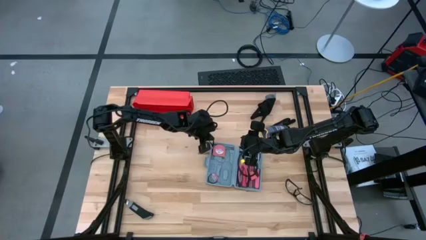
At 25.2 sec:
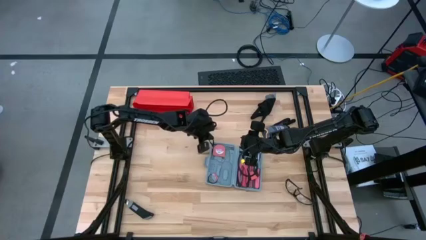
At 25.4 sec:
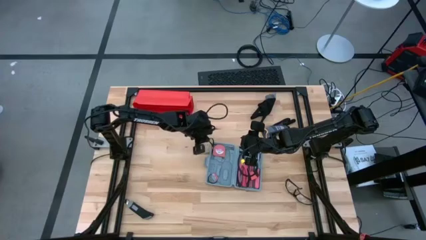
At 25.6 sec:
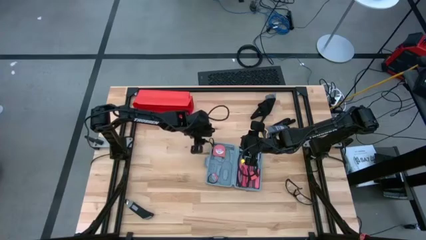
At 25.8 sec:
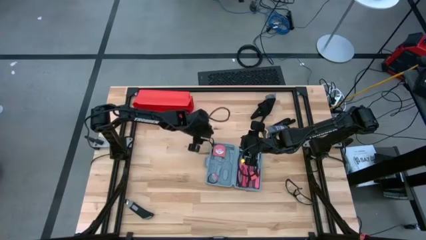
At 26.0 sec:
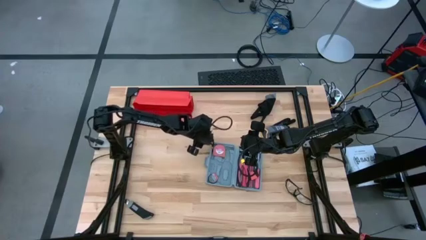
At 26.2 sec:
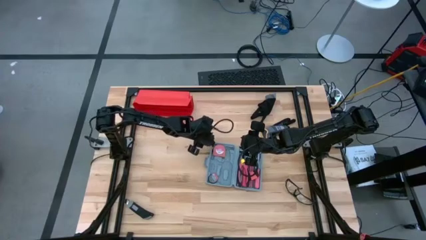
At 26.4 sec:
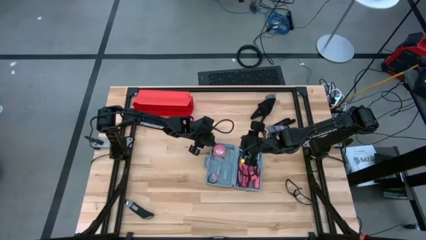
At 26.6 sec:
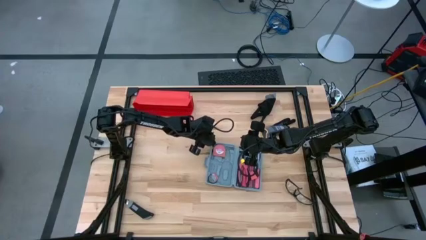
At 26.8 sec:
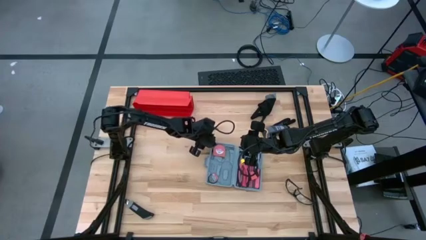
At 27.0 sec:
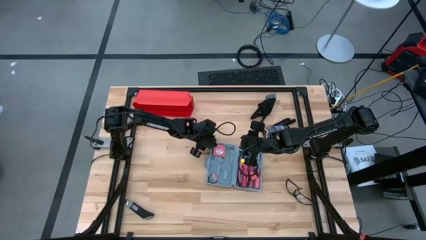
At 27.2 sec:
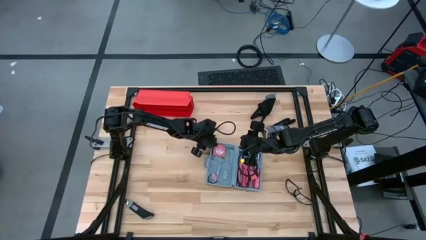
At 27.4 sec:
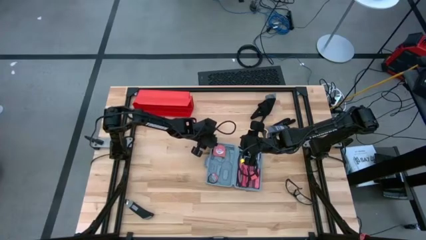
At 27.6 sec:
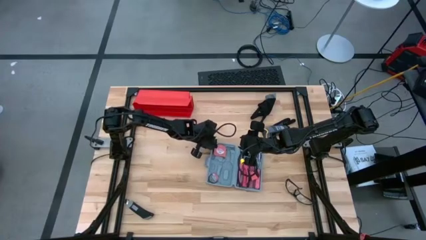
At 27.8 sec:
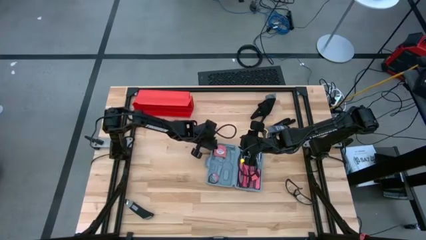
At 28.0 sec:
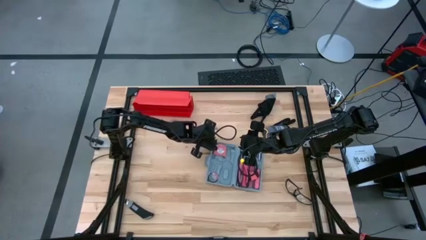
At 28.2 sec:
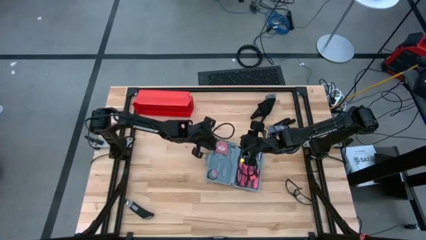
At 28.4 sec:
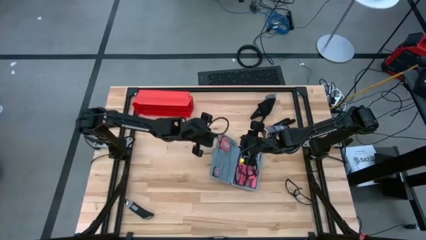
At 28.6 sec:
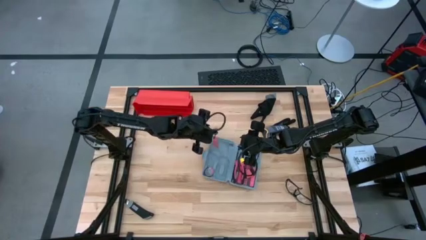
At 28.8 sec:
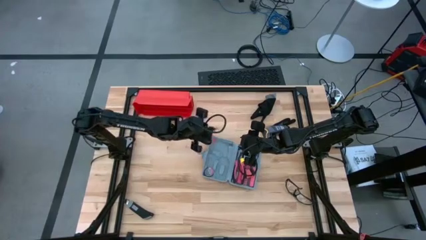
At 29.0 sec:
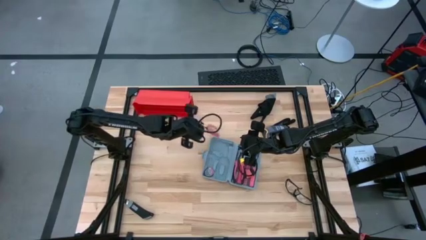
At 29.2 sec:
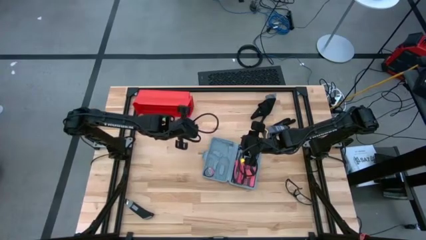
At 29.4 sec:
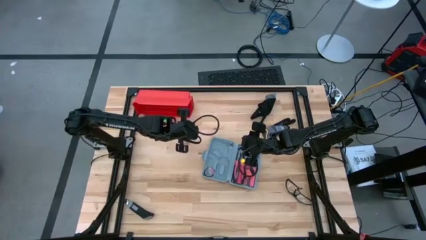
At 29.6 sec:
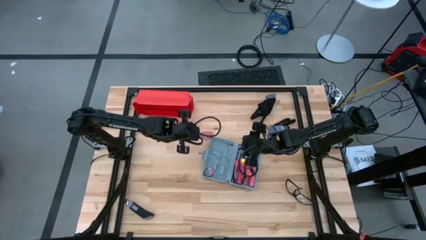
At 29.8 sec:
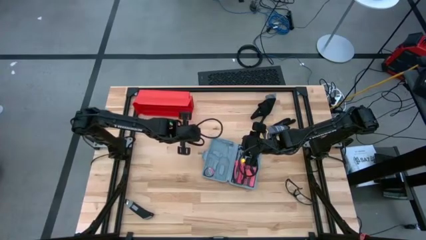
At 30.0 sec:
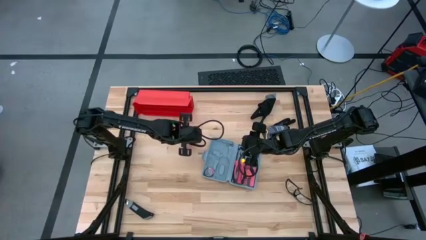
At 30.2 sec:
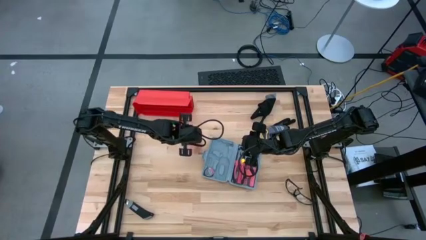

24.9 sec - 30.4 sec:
Task: prefit tool cases
Remove the orange measuring tape from the gray pre-fit tool case

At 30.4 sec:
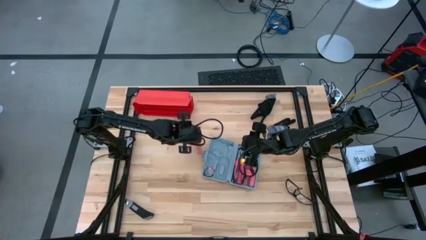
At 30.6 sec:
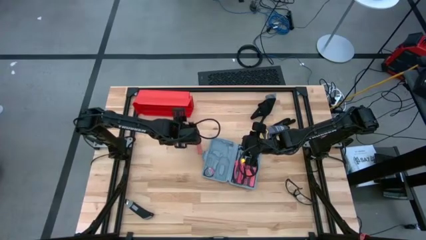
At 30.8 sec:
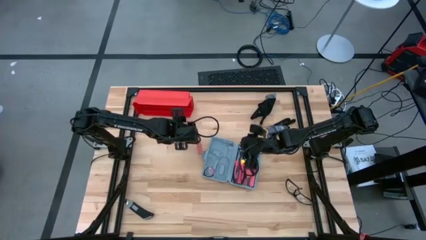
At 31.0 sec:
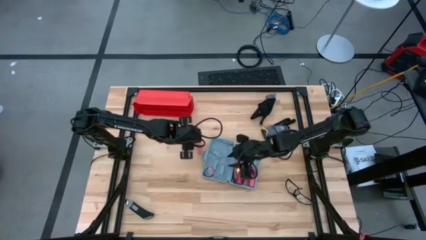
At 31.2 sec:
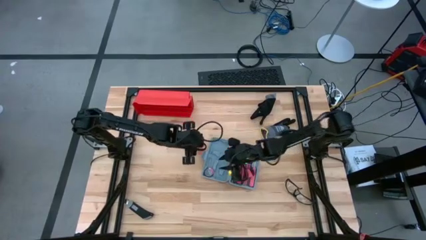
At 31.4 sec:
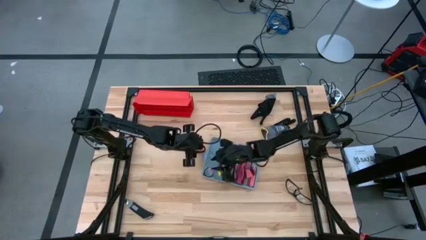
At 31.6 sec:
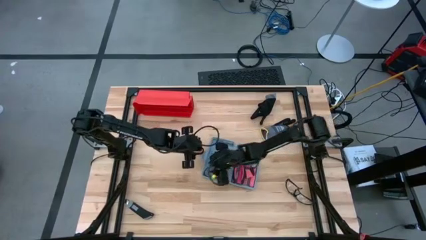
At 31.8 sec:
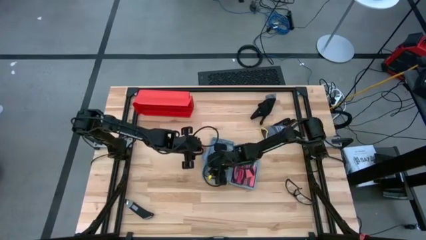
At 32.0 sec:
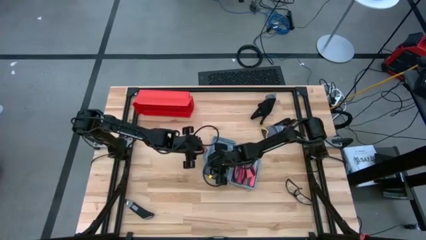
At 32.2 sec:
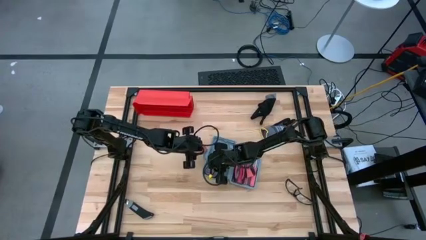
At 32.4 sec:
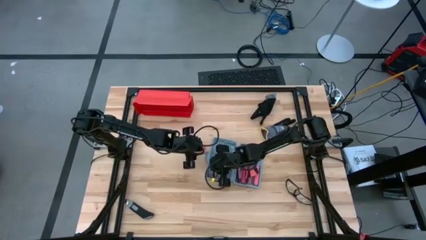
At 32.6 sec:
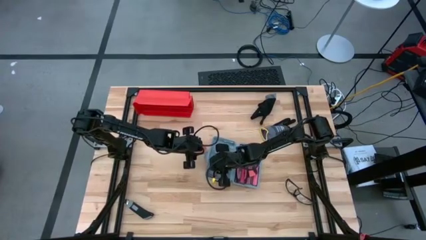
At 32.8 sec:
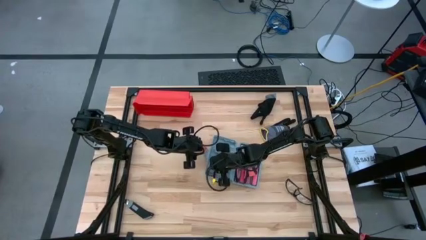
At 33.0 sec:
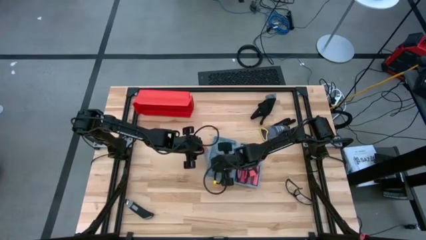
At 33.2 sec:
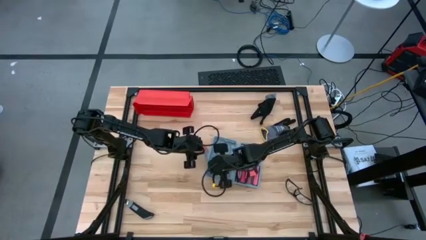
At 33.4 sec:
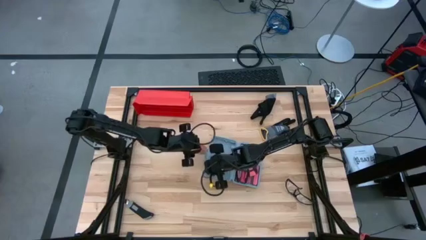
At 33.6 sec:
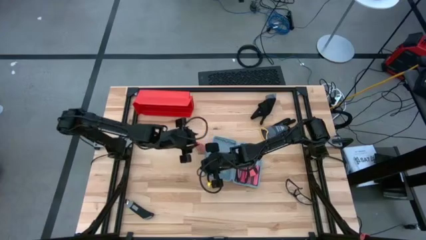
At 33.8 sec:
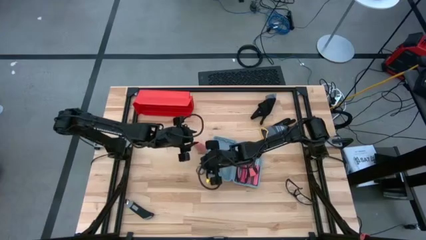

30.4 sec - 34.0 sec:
Remove the black electrical tape from the gray pre-fit tool case

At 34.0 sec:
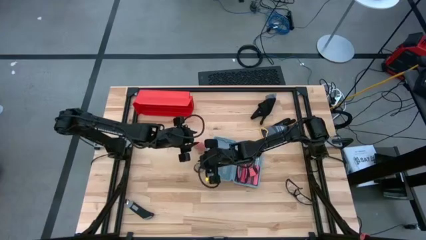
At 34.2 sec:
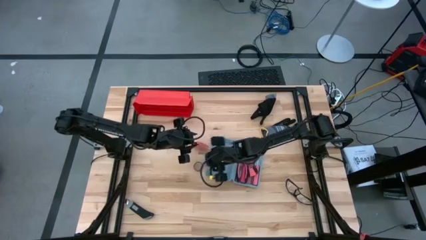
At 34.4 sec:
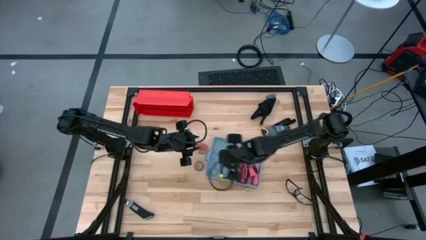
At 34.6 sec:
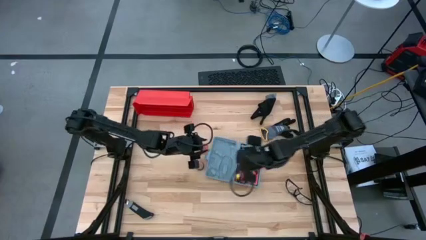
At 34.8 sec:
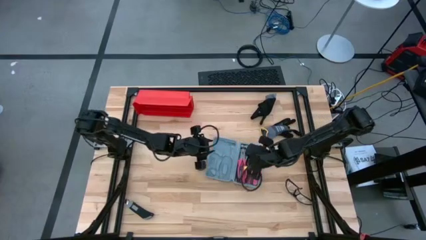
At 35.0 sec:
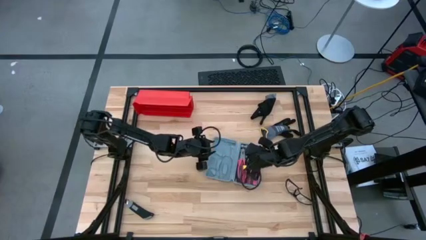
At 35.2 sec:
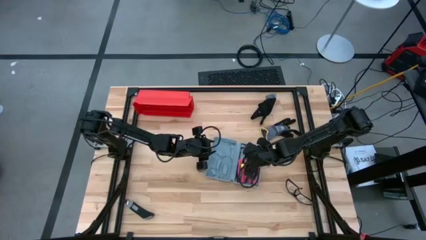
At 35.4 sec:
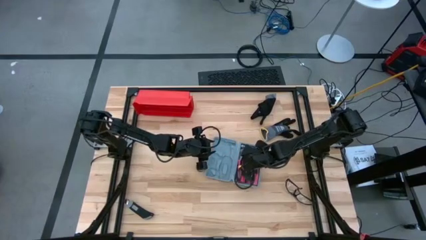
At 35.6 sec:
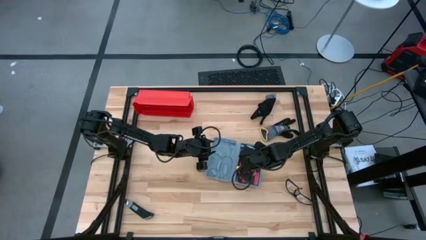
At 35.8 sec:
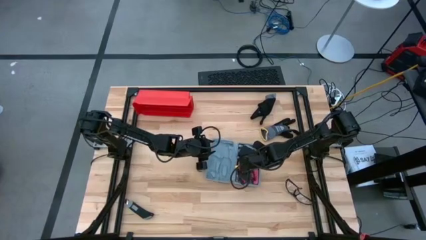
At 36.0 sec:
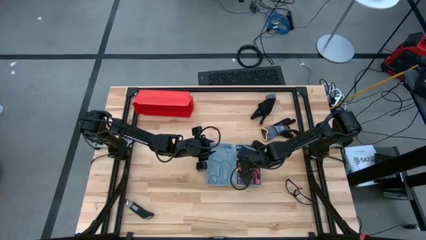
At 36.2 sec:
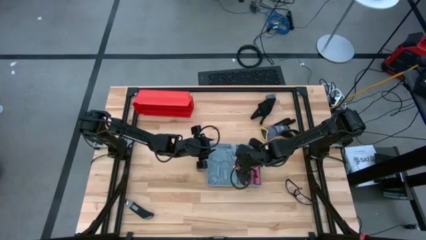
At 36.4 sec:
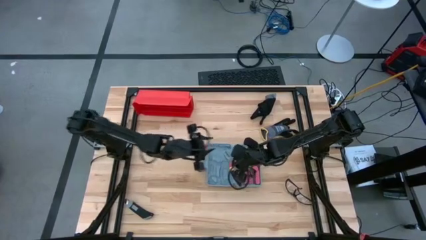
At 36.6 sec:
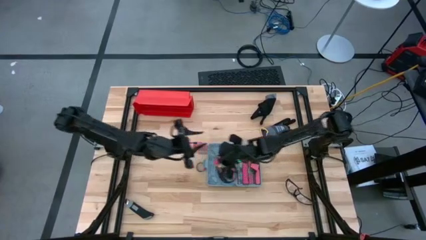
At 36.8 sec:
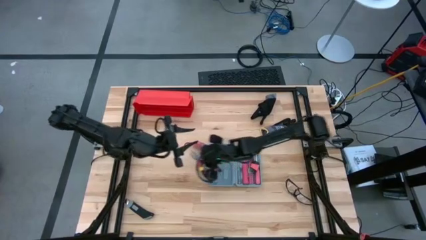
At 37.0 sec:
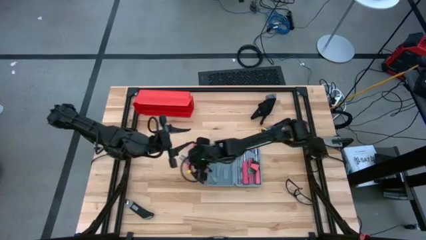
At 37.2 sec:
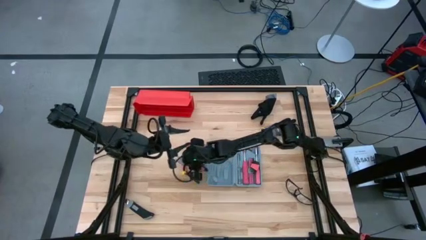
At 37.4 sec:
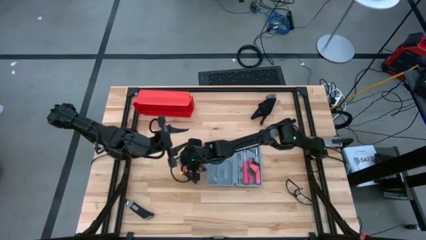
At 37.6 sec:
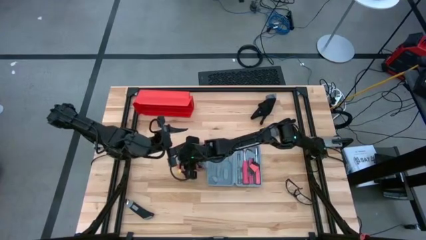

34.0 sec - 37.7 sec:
Remove the orange pliers from the gray pre-fit tool case

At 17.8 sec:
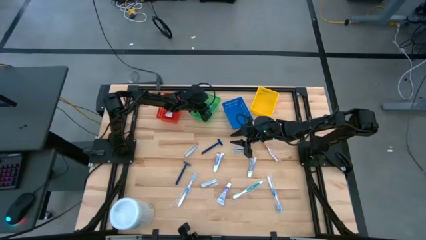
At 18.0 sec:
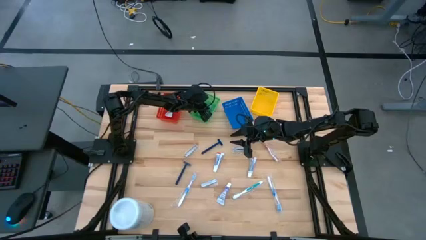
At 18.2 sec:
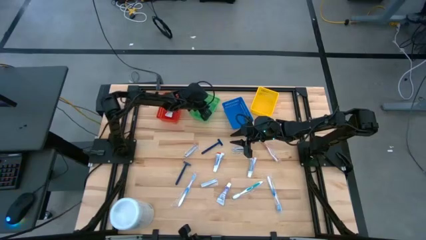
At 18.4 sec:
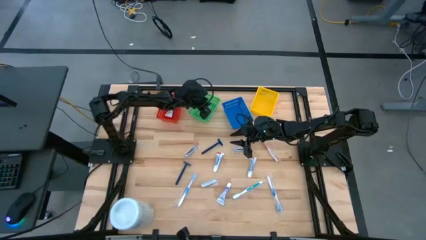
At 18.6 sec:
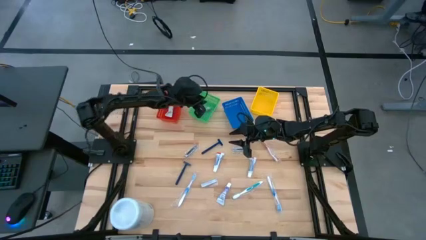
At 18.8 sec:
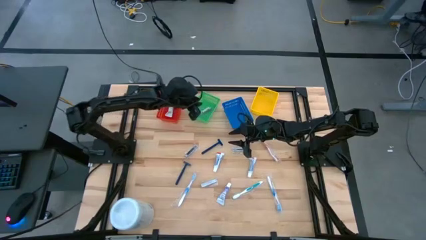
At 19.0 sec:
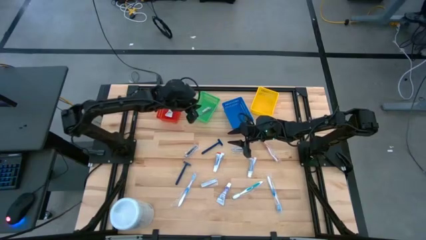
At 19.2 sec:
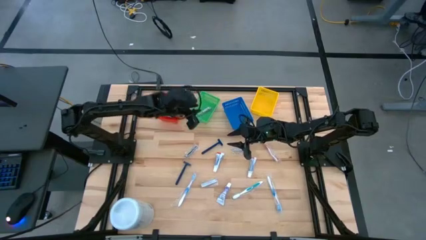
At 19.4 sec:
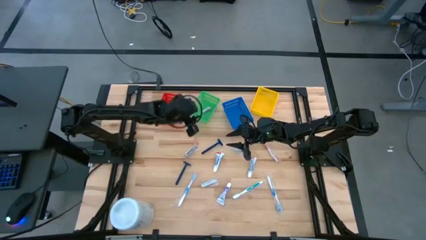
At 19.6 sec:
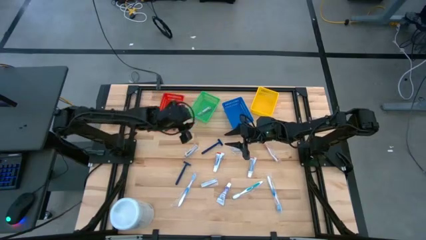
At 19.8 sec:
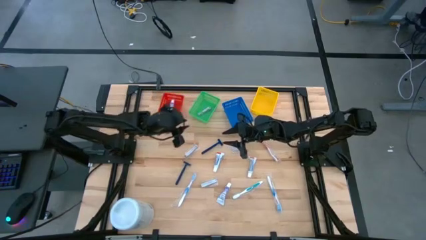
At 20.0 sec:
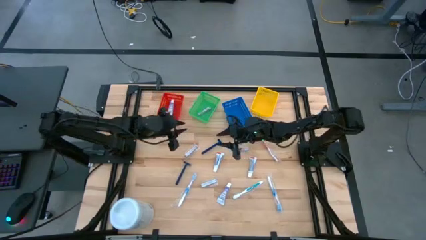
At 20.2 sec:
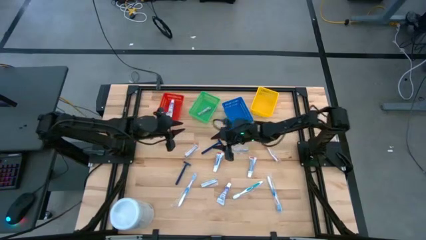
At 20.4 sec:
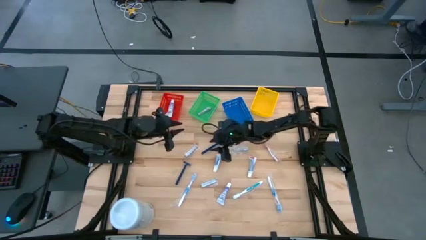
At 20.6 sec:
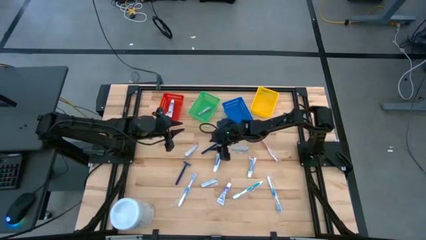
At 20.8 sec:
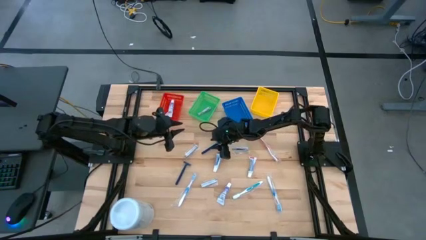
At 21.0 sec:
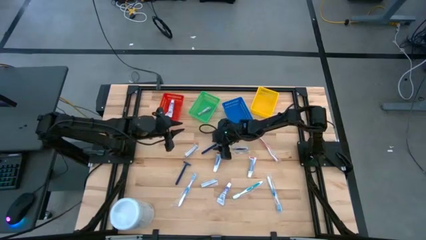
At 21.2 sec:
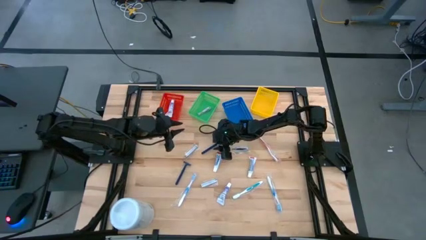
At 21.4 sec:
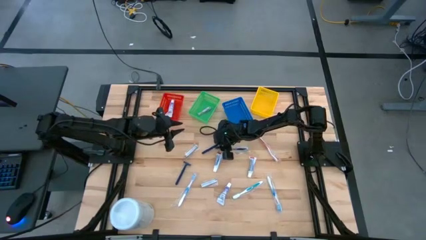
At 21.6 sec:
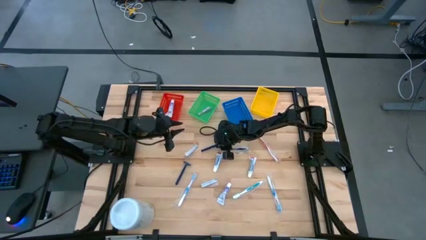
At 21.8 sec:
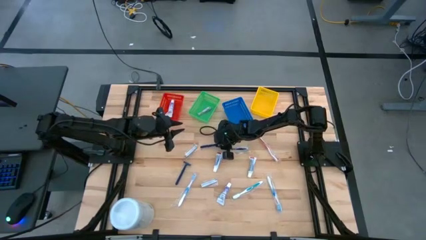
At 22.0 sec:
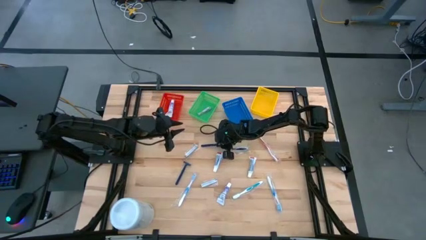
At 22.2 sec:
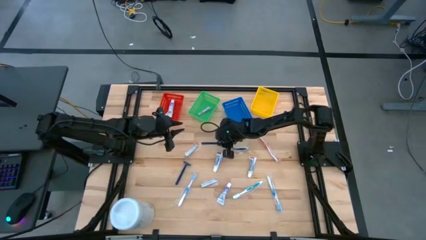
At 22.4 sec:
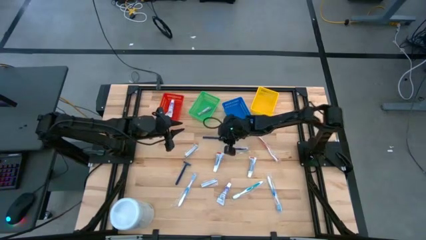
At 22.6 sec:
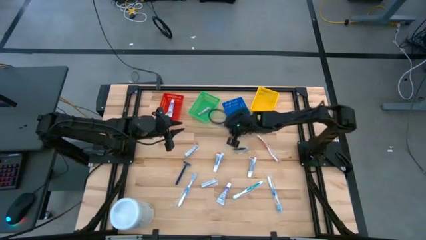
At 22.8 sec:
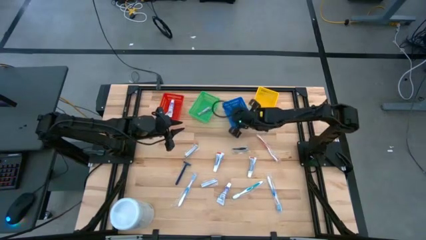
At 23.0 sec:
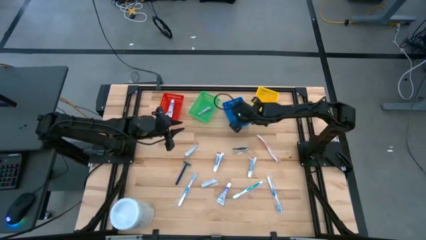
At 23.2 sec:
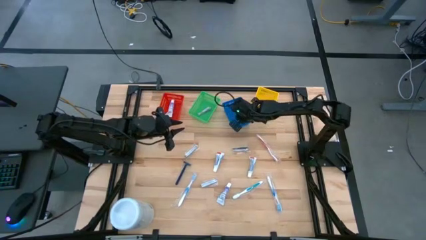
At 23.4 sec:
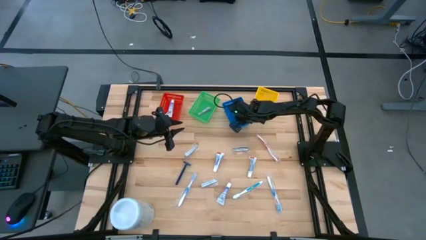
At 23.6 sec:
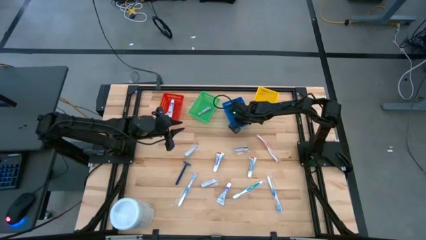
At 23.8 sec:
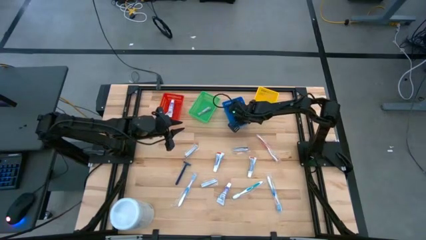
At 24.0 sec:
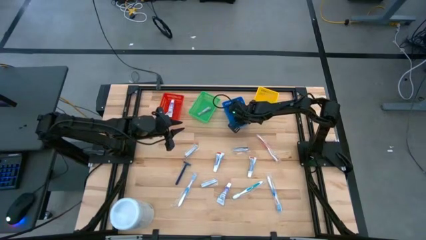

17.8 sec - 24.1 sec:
Task: Pick & Place Travel size toiletries
Put the blue razor in the blue bin
